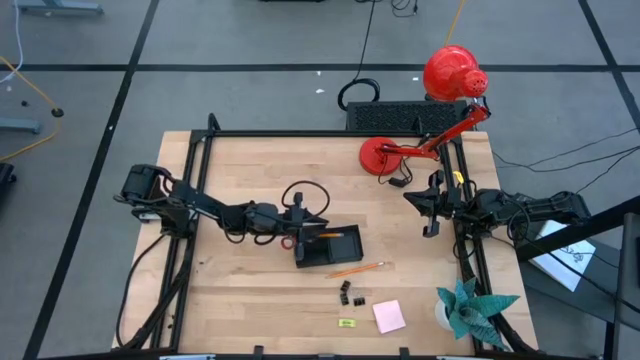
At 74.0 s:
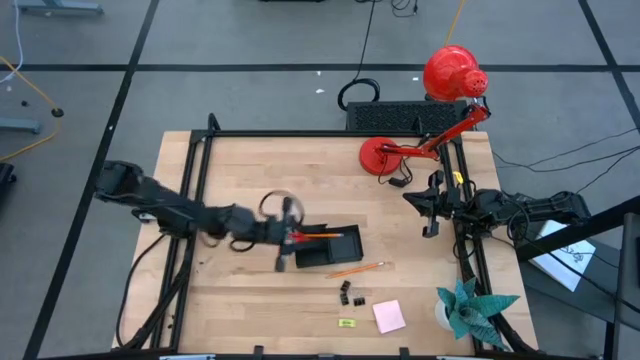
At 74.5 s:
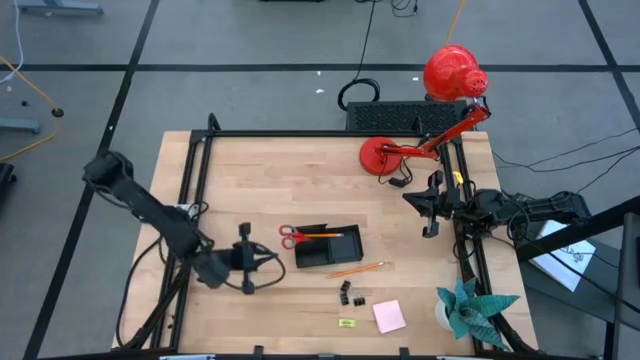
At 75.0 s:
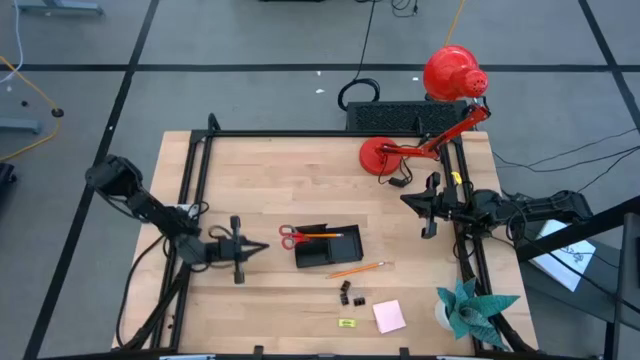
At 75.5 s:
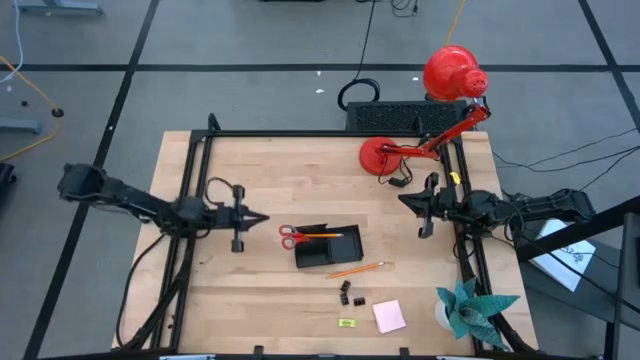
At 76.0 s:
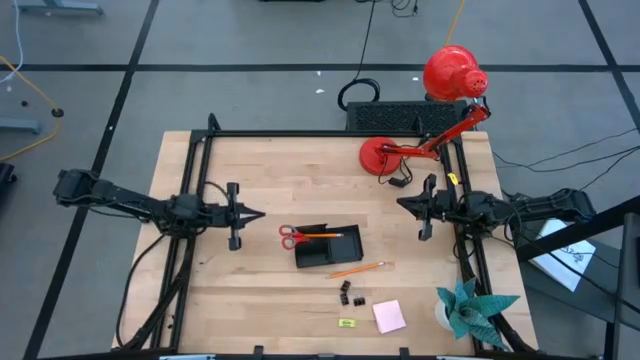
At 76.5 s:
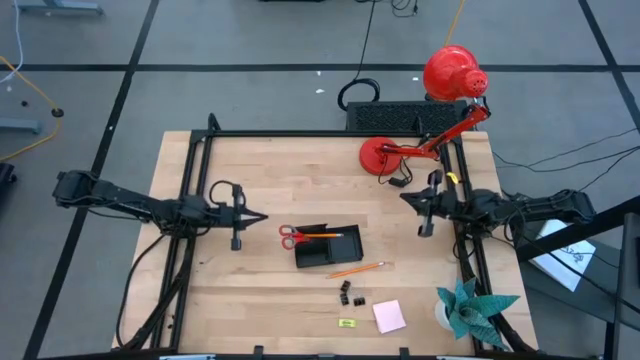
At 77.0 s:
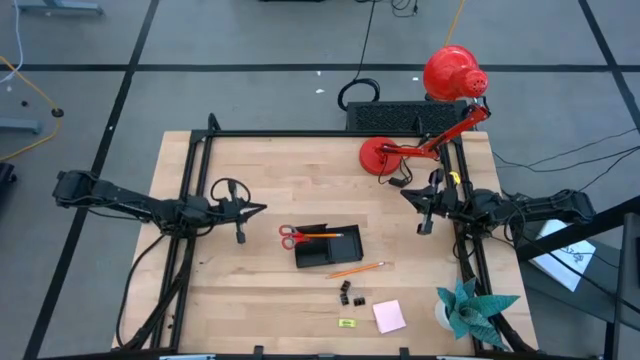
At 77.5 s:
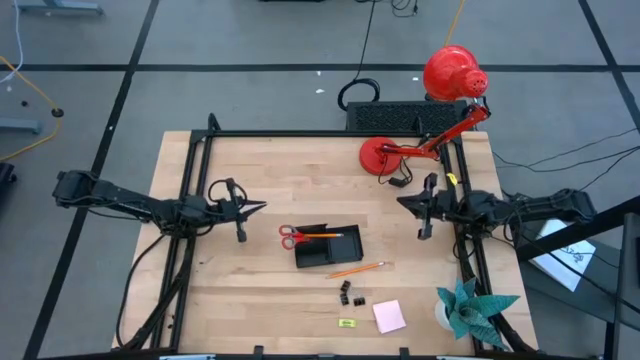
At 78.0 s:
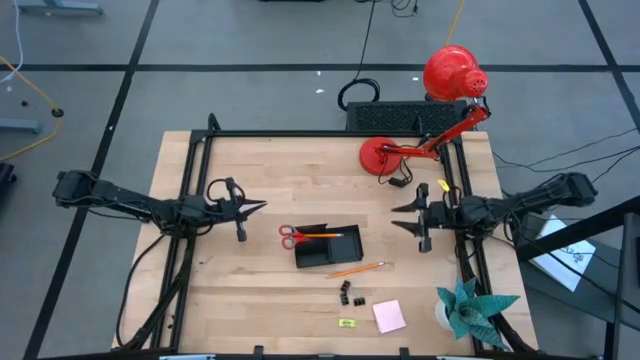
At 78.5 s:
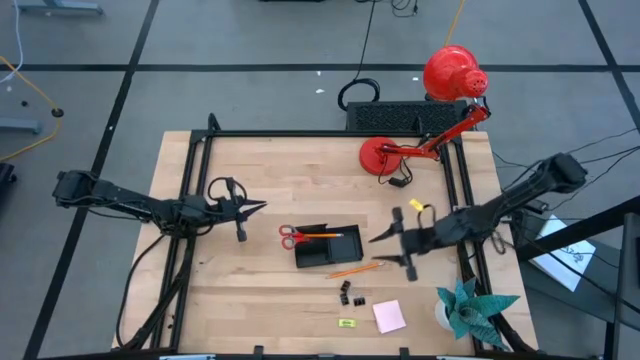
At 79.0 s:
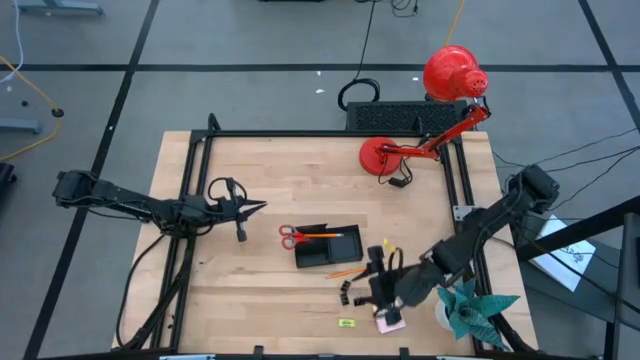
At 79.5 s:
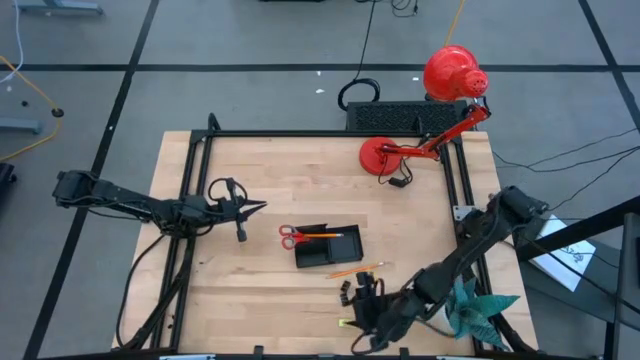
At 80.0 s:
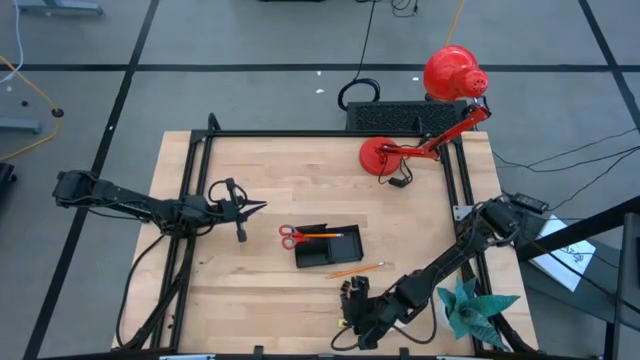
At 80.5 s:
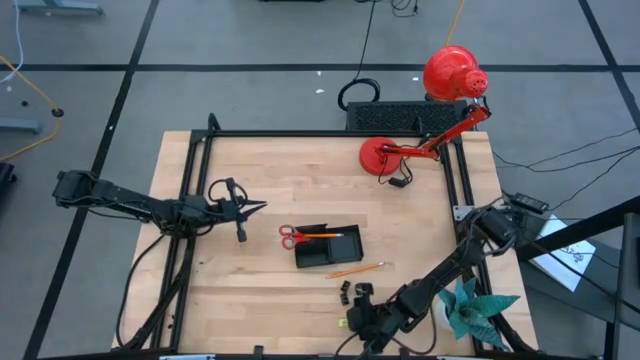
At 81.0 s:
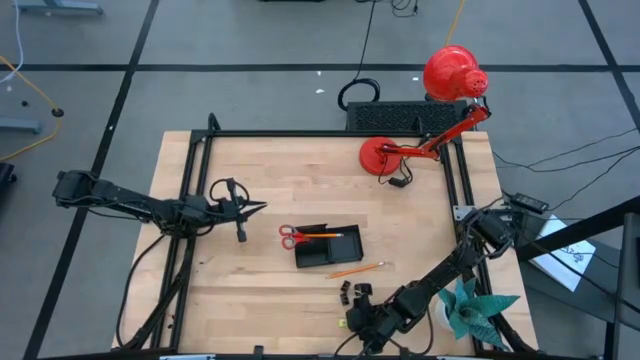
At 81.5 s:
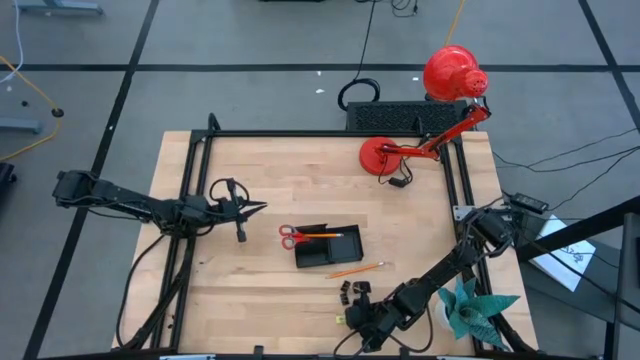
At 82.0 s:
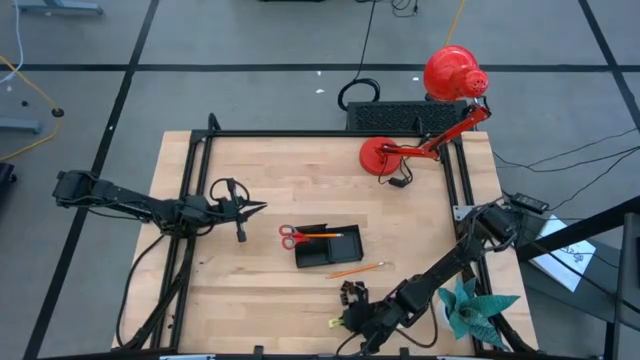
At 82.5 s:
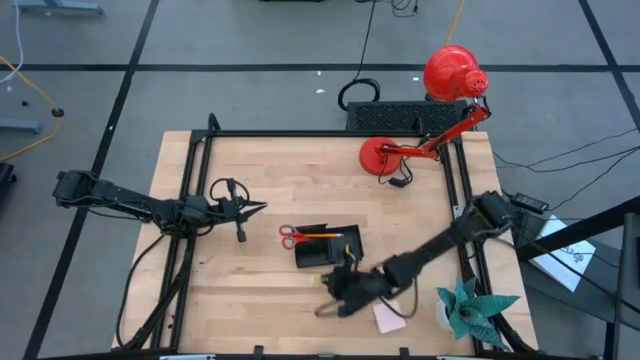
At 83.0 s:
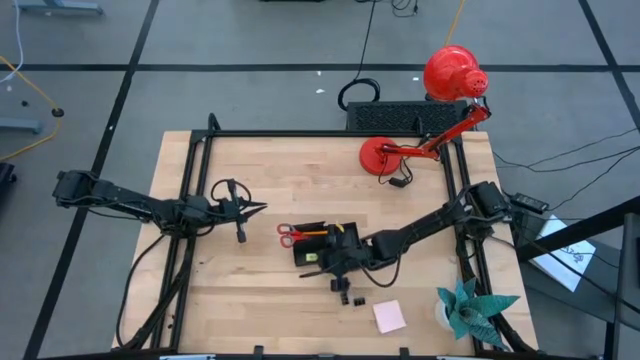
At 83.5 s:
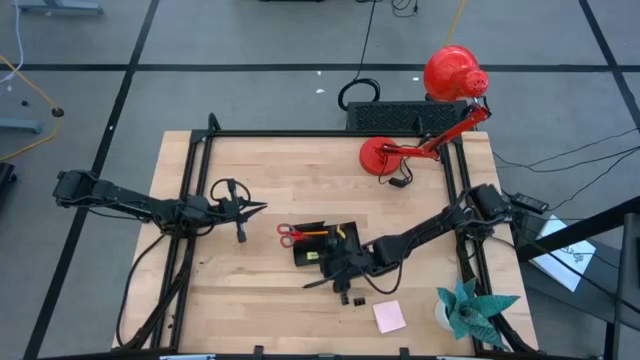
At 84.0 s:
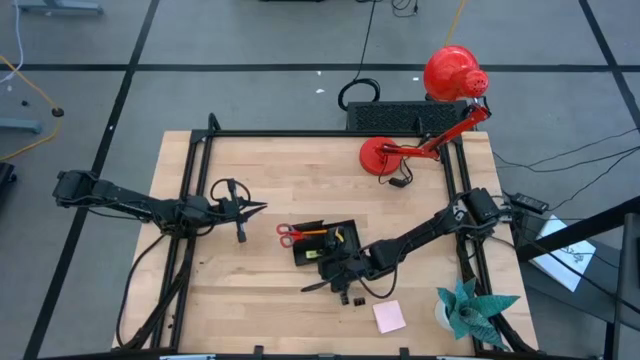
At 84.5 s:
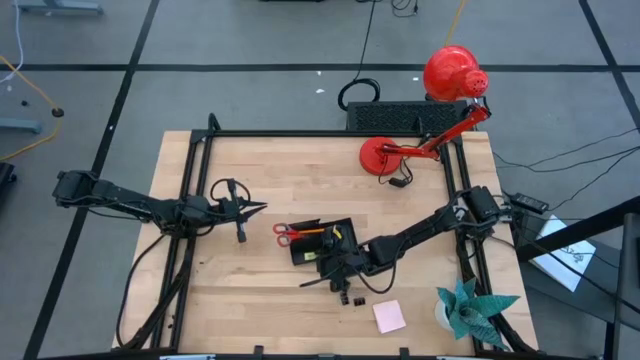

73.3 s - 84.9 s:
Task: Pick and place office supplies into organizer
Put the eraser into the bottom left compartment of the desk organizer

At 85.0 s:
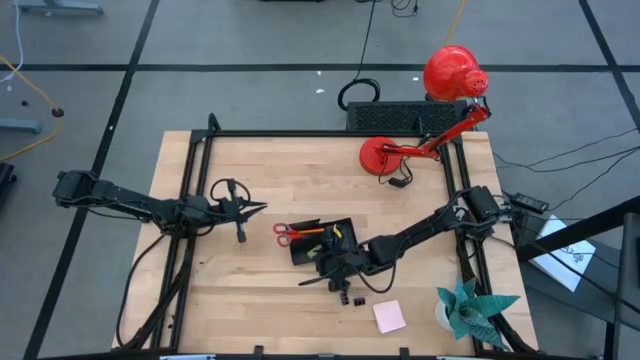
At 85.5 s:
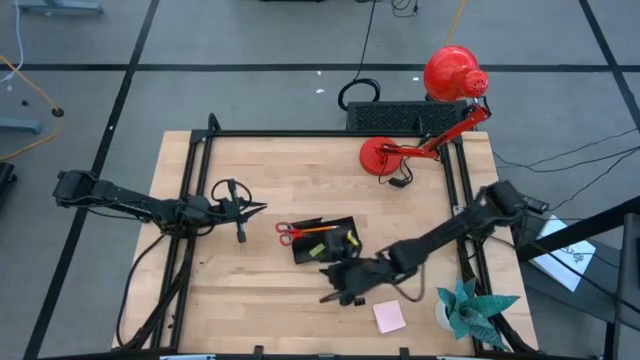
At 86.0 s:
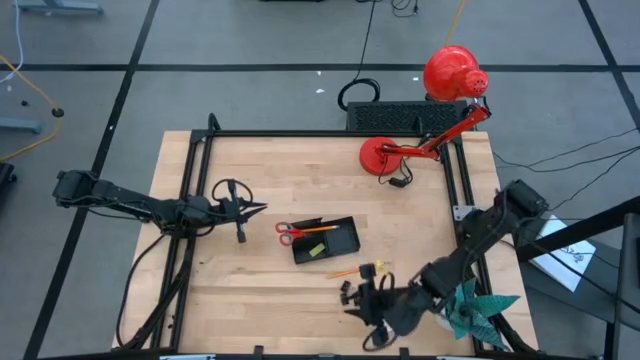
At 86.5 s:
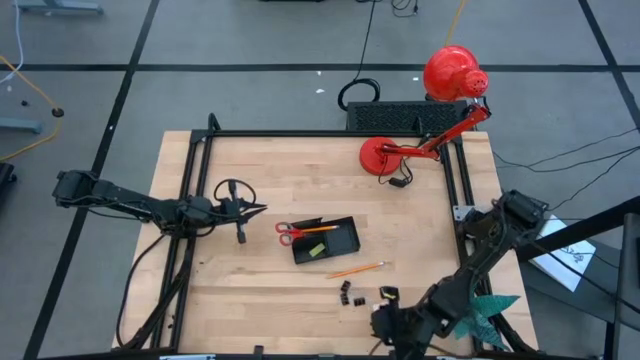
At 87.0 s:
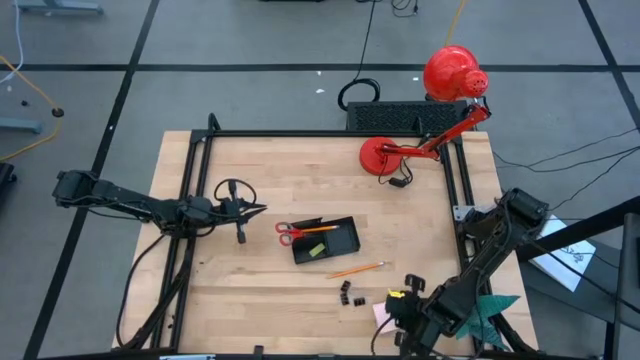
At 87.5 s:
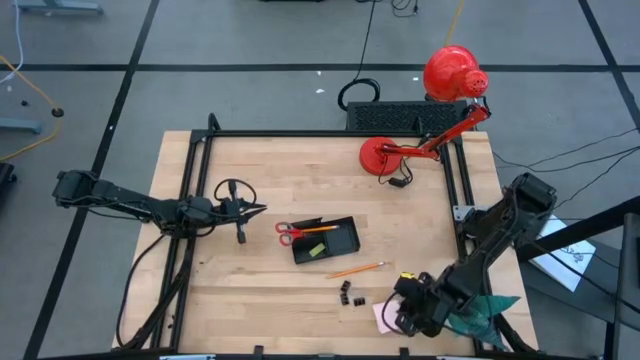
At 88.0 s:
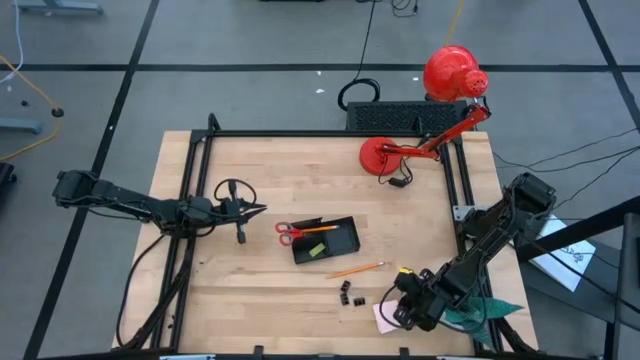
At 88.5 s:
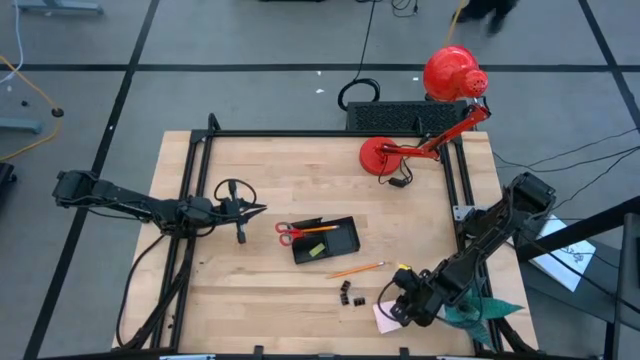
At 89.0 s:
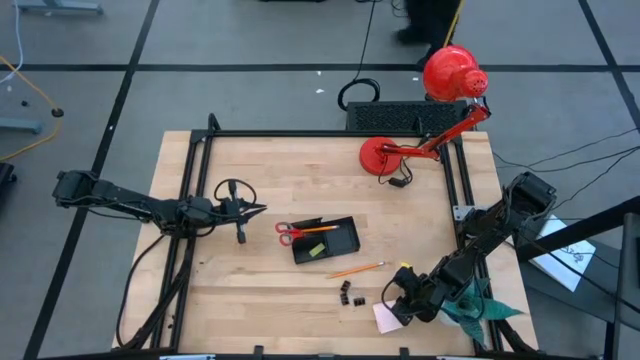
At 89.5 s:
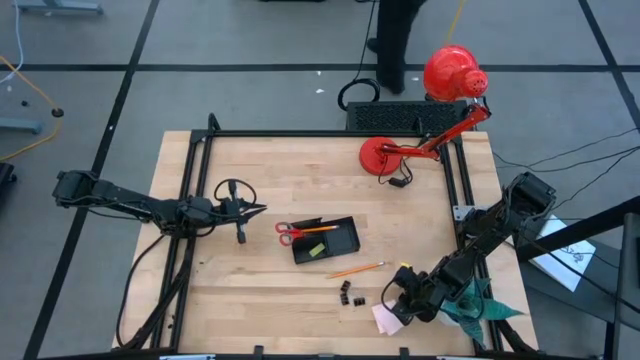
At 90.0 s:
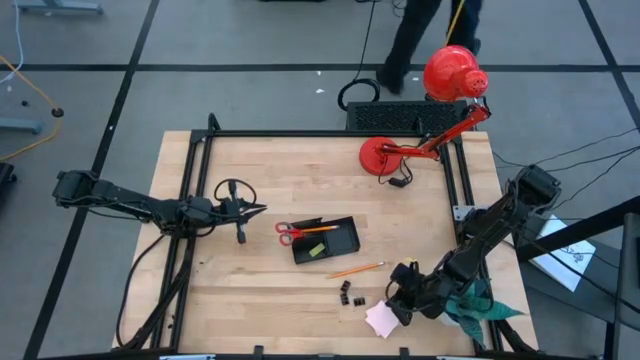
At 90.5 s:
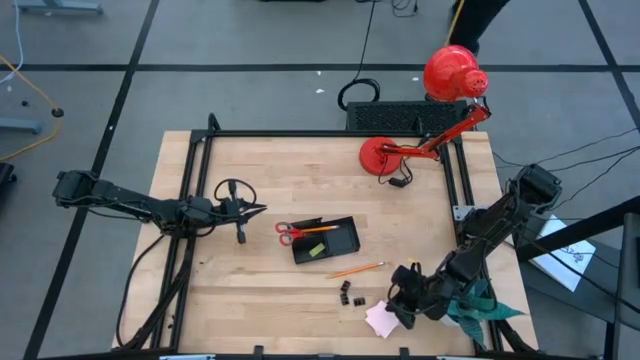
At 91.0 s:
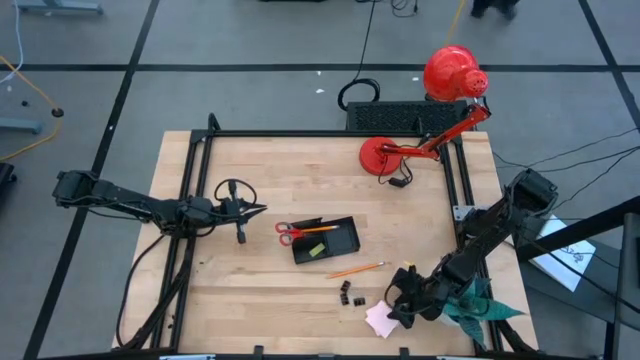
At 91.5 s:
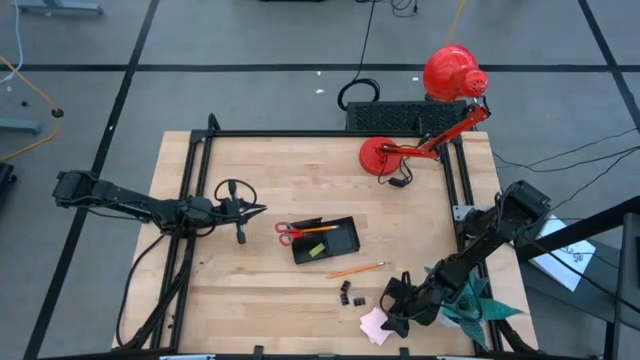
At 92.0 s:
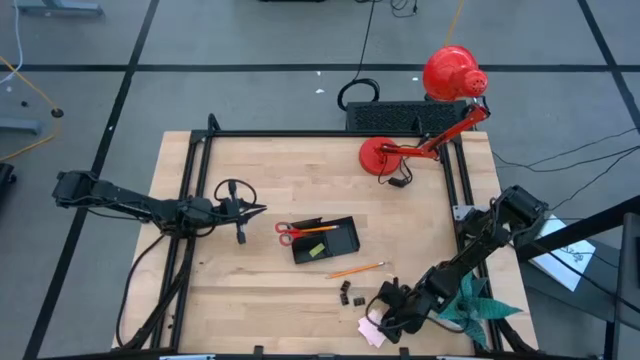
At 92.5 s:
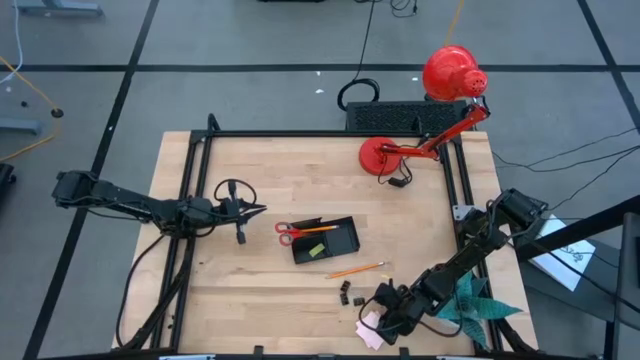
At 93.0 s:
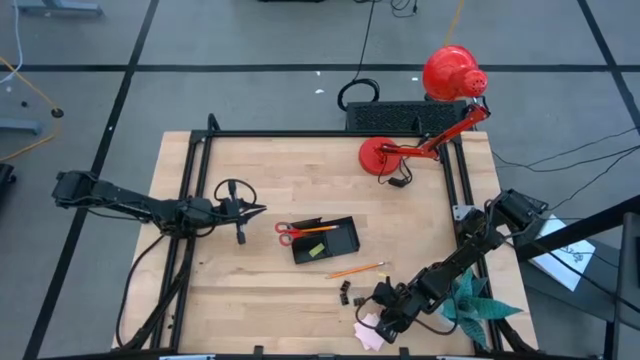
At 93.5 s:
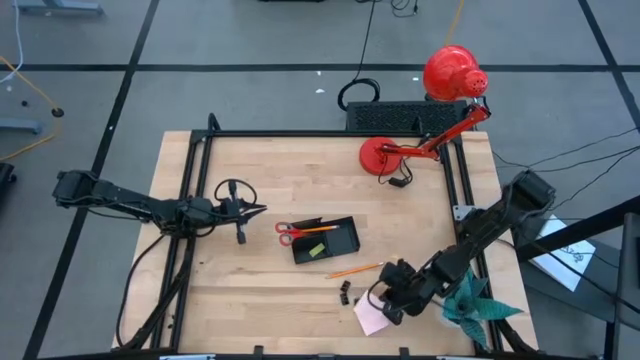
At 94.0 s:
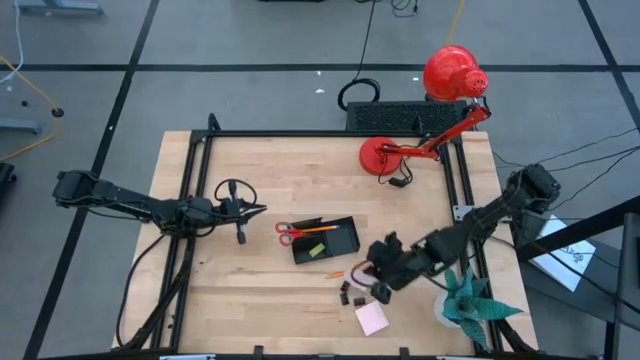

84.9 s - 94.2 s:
Put the top sticky note into the right compartment of the desk organizer
